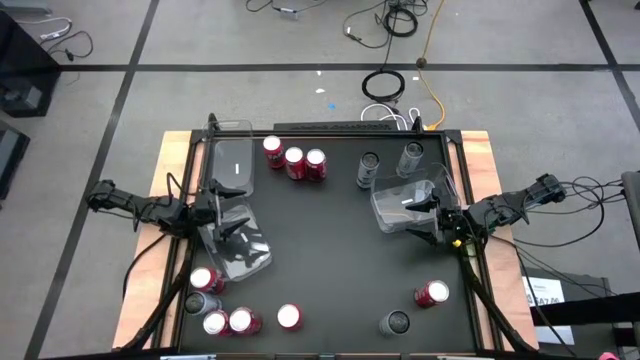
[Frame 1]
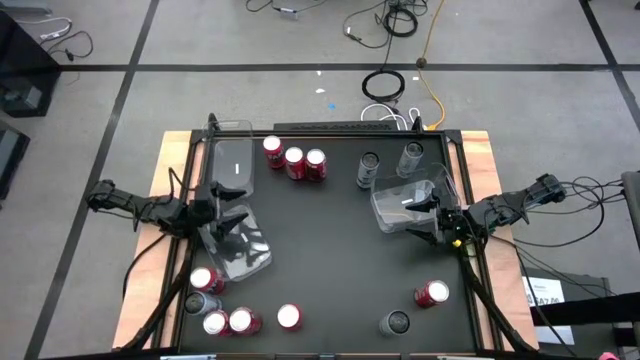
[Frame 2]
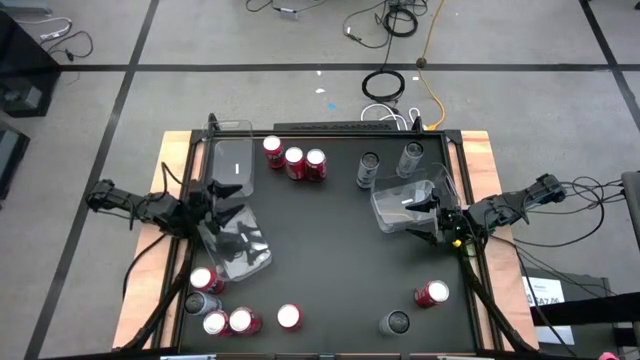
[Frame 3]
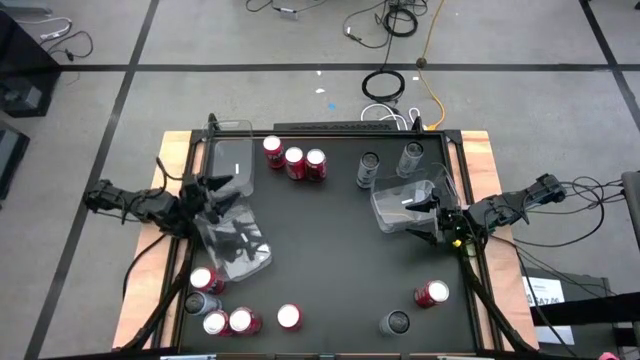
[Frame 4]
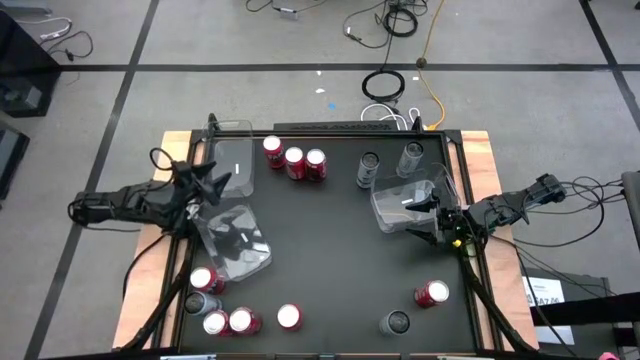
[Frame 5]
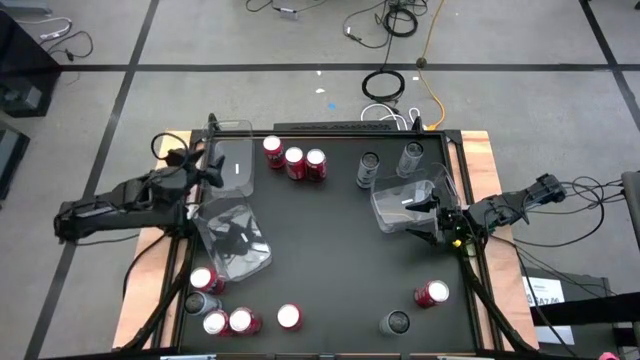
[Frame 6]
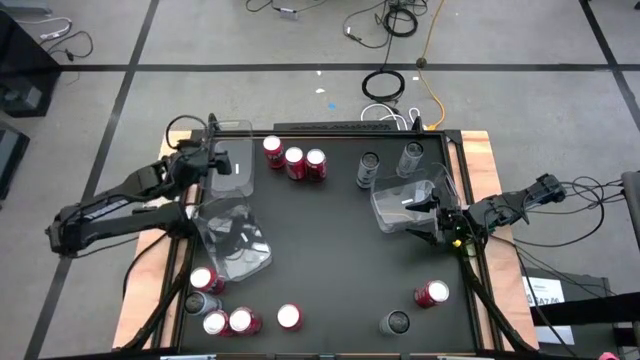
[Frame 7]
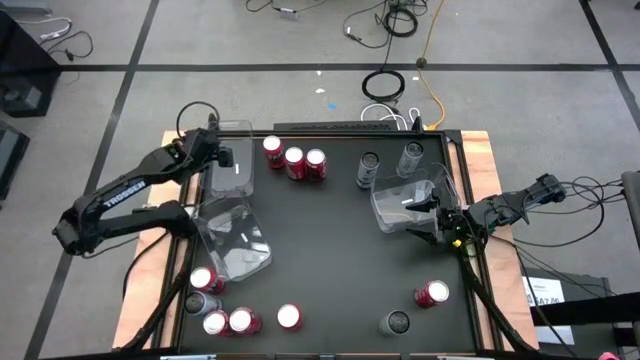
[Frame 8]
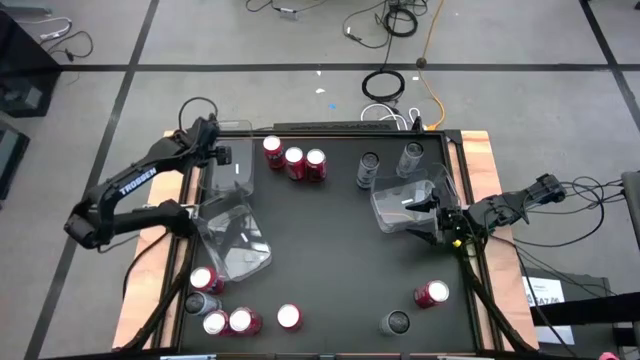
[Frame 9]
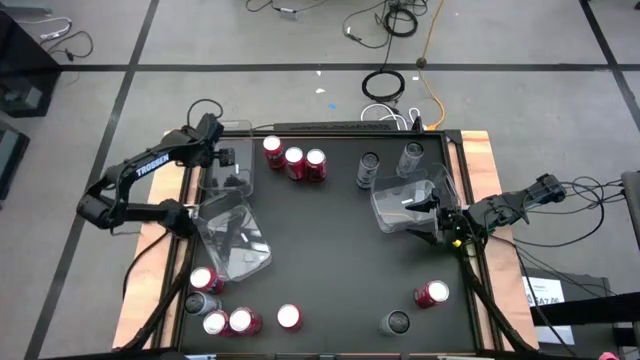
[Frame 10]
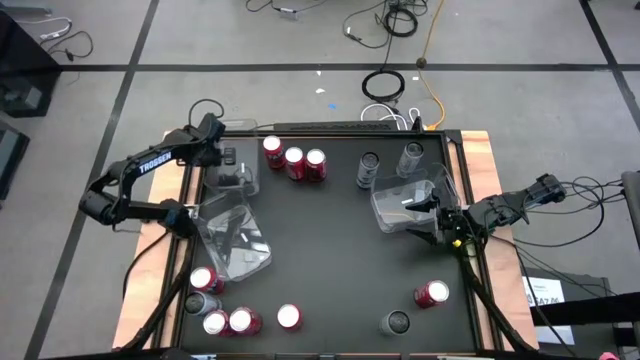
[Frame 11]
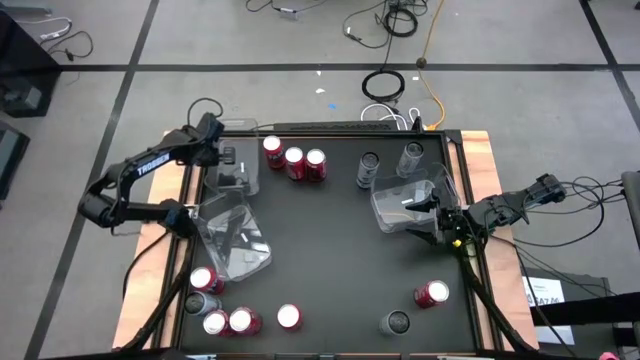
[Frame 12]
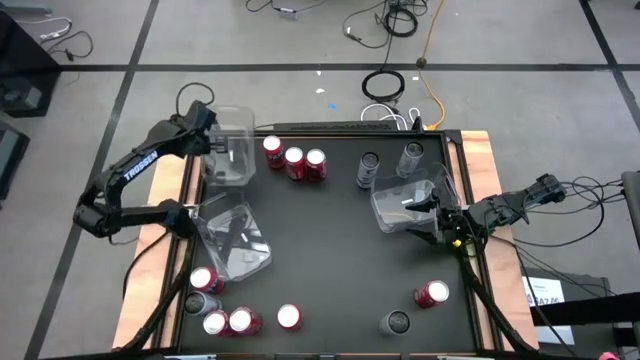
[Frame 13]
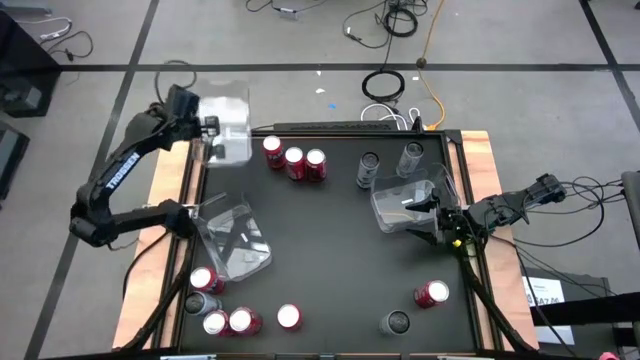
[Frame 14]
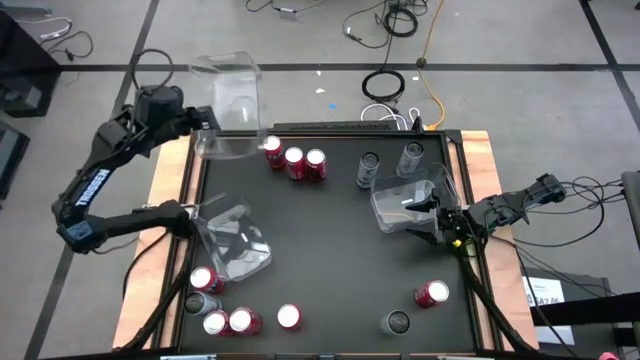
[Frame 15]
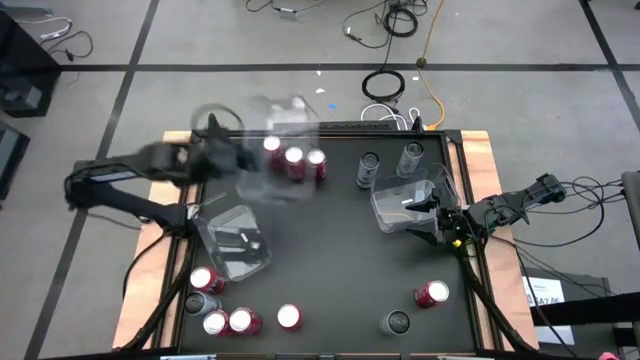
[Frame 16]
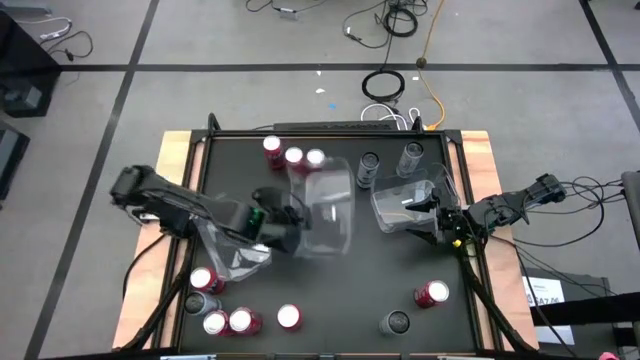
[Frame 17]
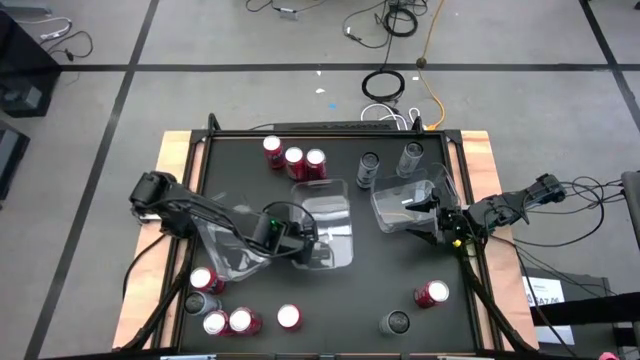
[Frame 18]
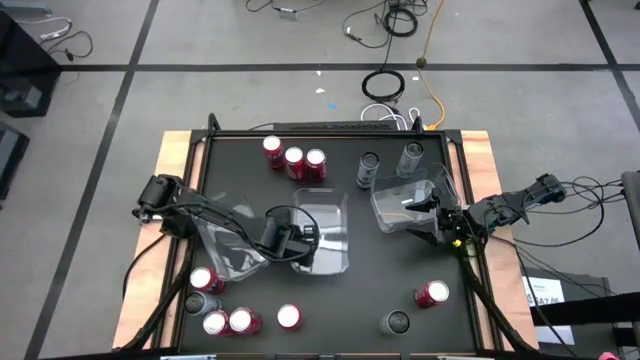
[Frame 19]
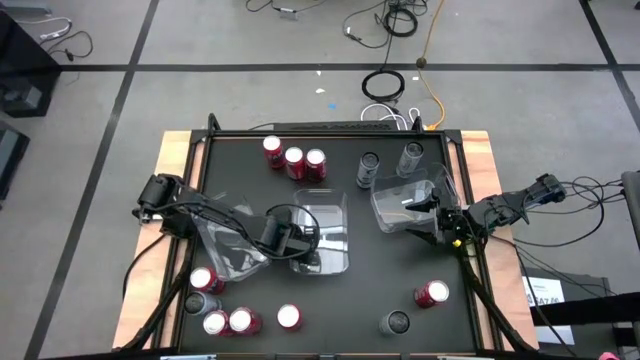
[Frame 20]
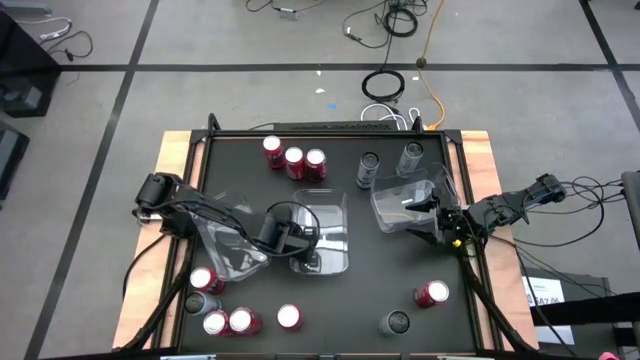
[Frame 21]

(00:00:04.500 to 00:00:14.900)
Task: Sort soda cans
Move the top left transparent bin to the center of the table

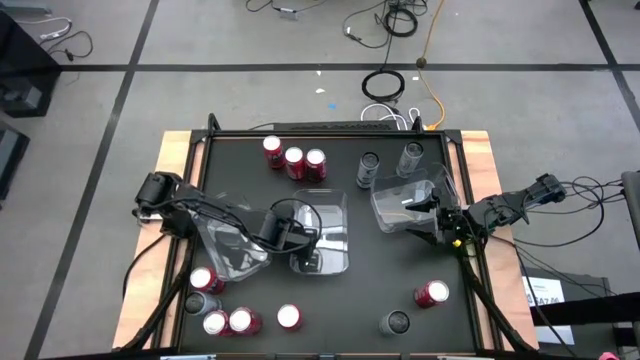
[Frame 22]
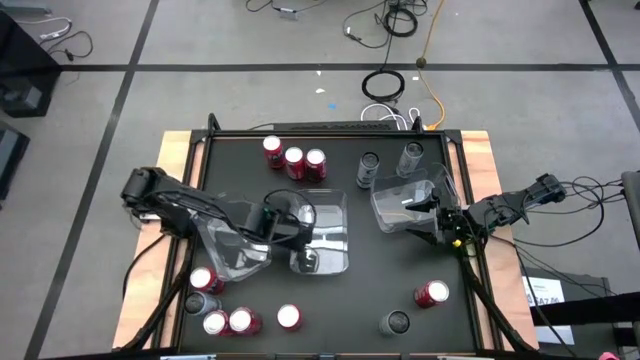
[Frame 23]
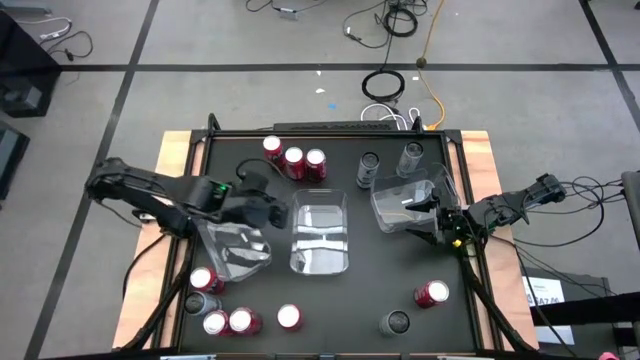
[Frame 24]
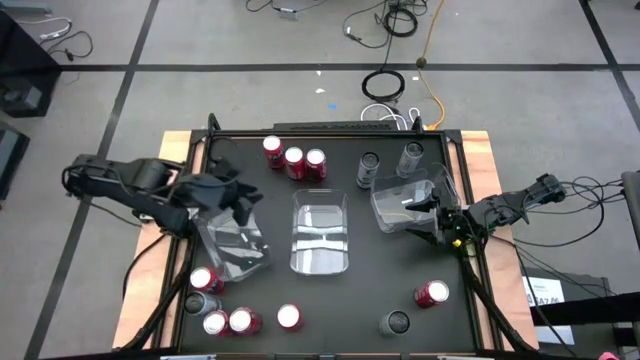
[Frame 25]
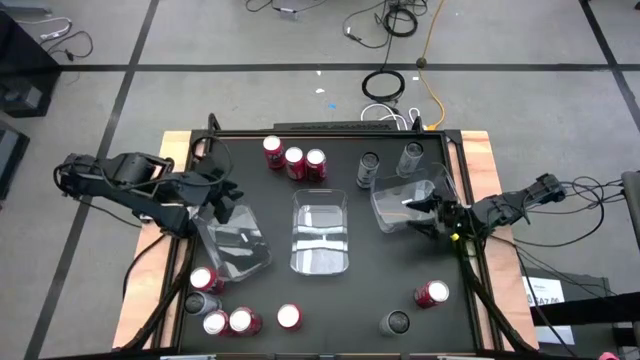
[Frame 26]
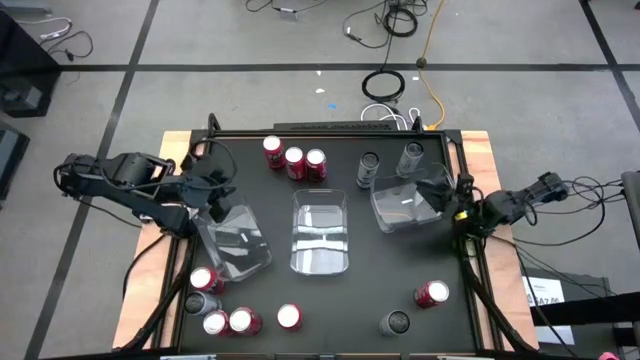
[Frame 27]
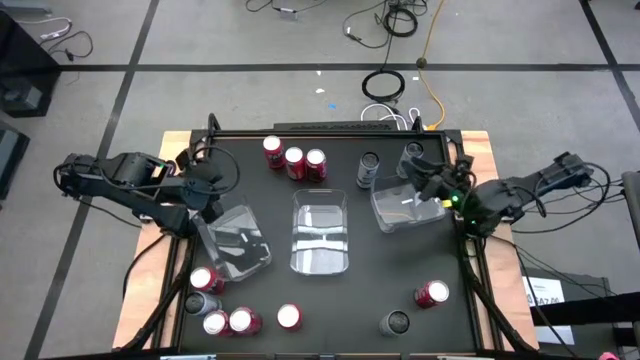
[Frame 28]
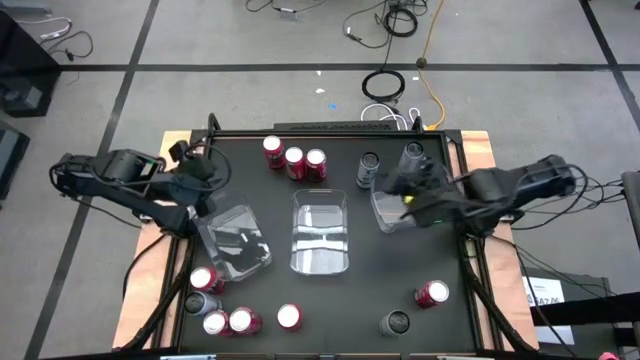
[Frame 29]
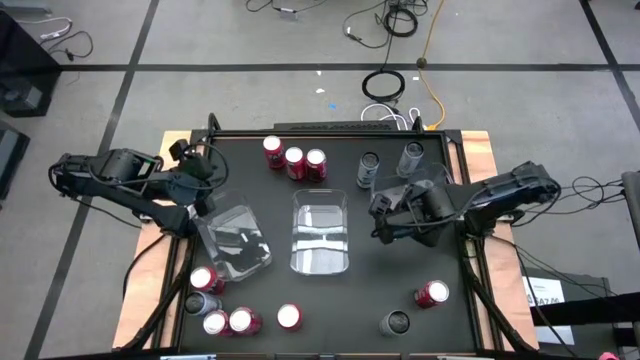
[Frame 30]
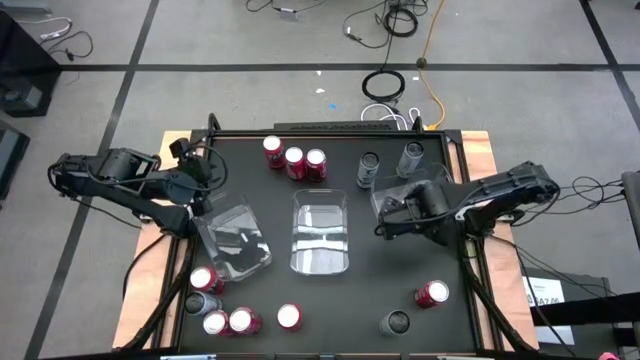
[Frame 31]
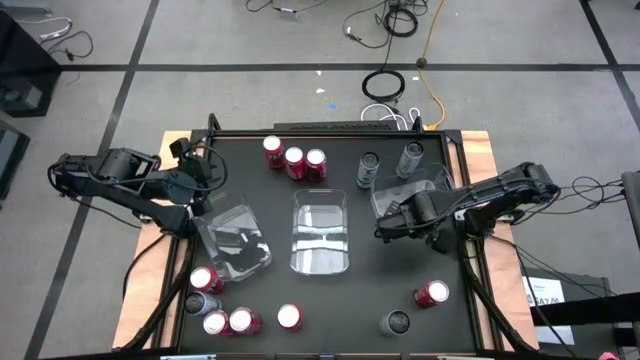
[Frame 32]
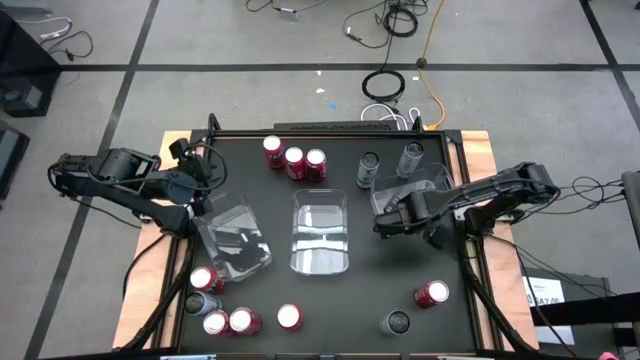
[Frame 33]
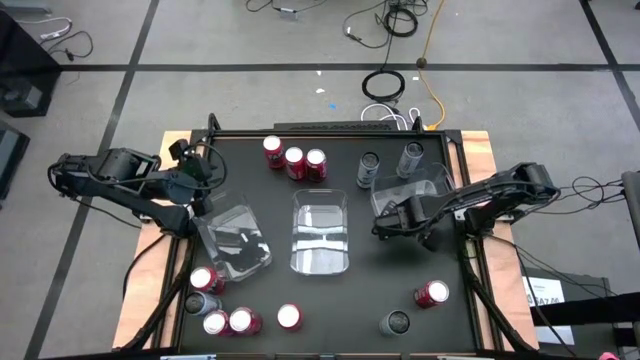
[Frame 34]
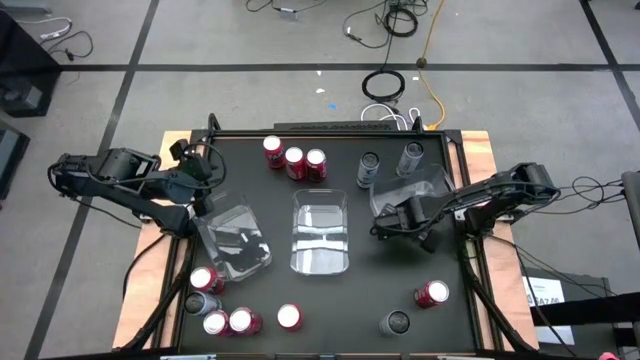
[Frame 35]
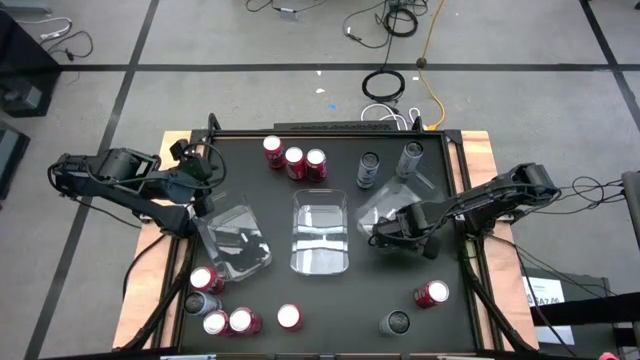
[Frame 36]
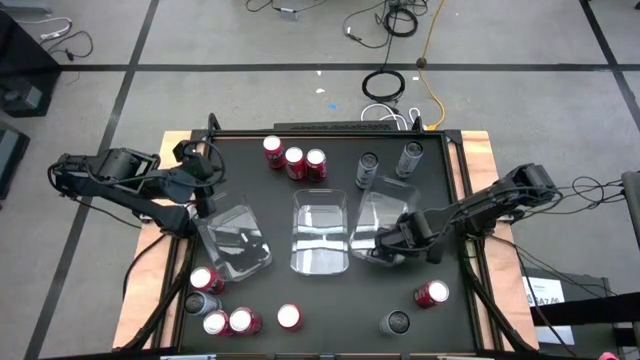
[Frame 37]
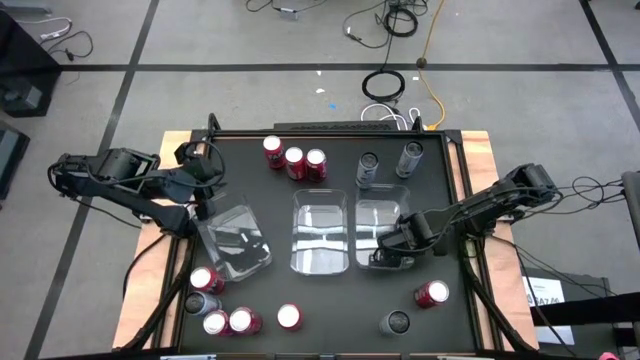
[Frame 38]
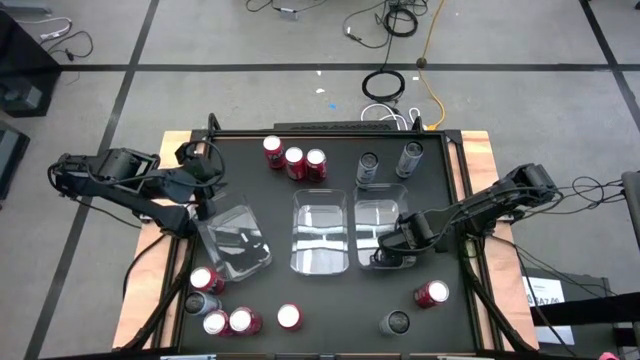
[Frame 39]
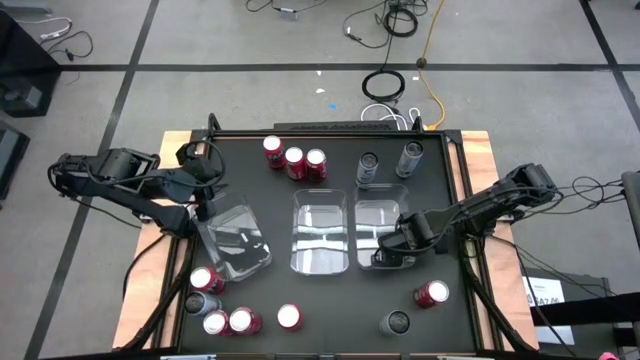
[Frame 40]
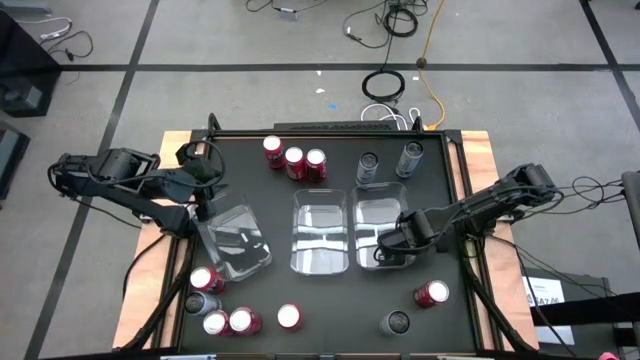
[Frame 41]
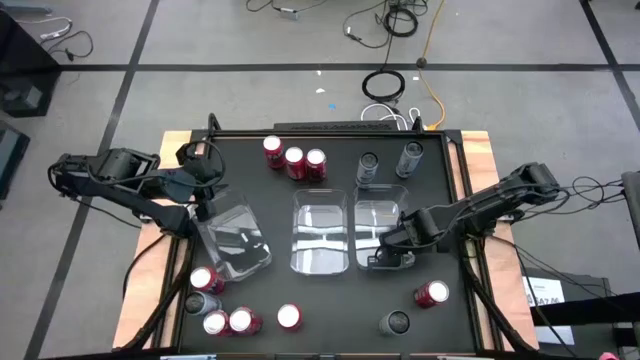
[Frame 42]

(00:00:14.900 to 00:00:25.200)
Move the top right transparent bin beside the center transparent bin

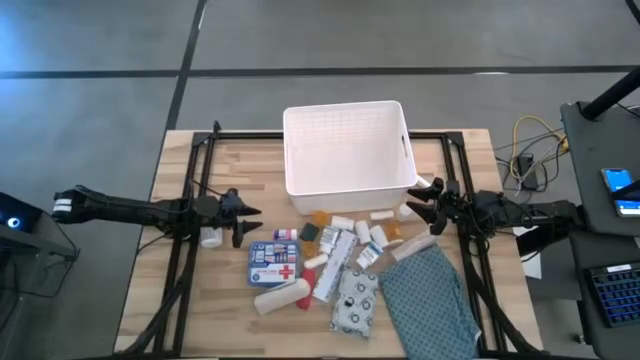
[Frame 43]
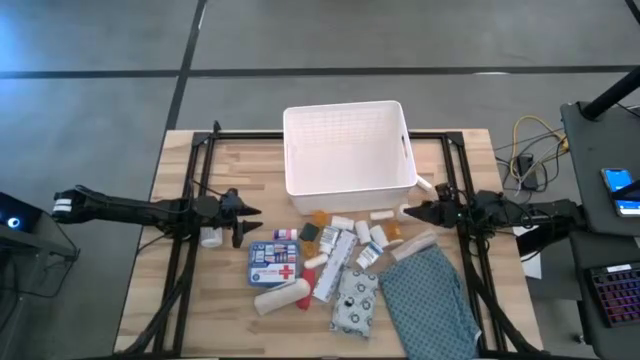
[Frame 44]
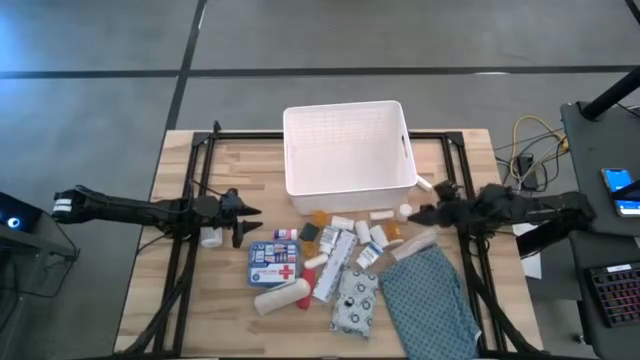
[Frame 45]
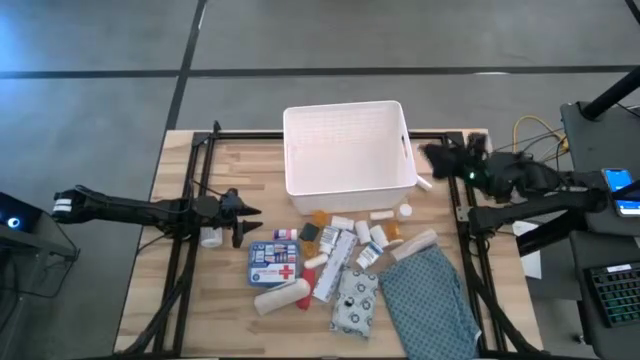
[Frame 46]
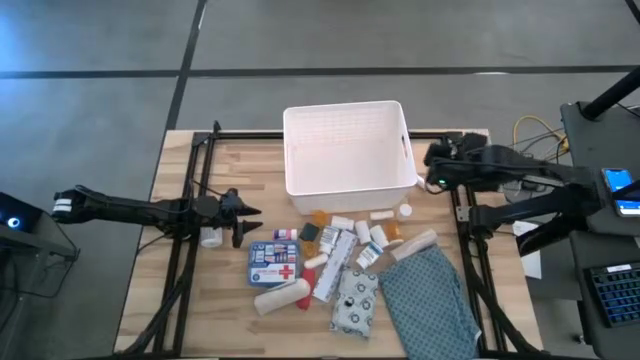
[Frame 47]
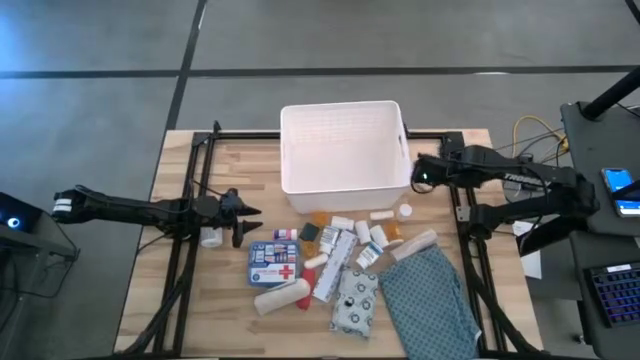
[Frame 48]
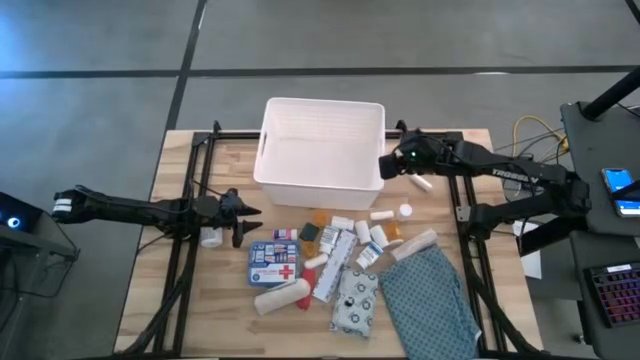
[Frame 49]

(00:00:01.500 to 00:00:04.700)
Task: Pick & place medical supplies in basket/bin
Adjust the white bin
